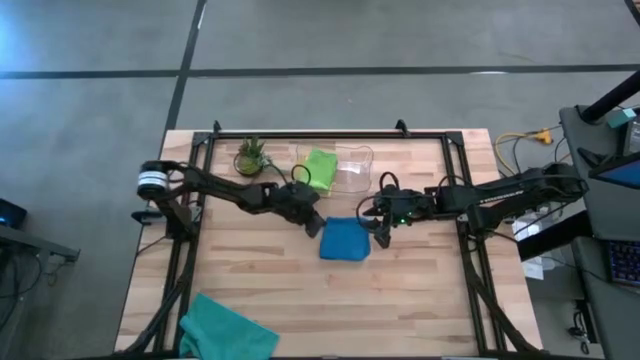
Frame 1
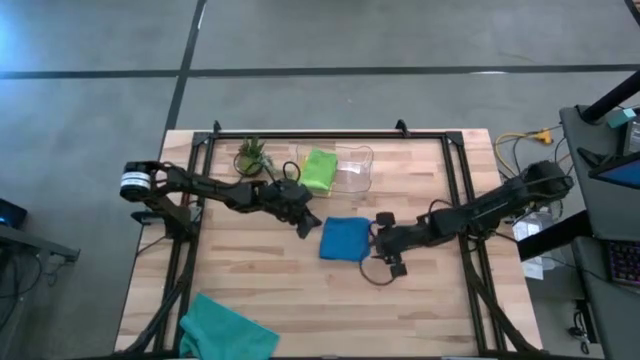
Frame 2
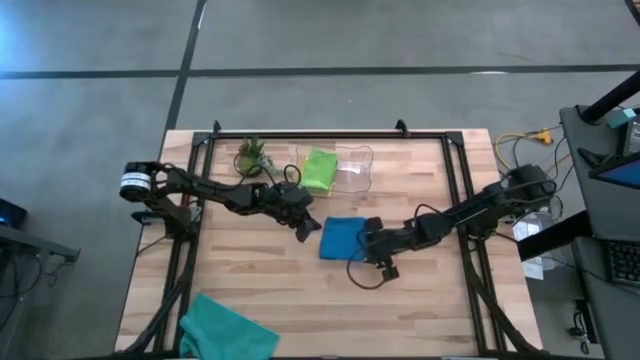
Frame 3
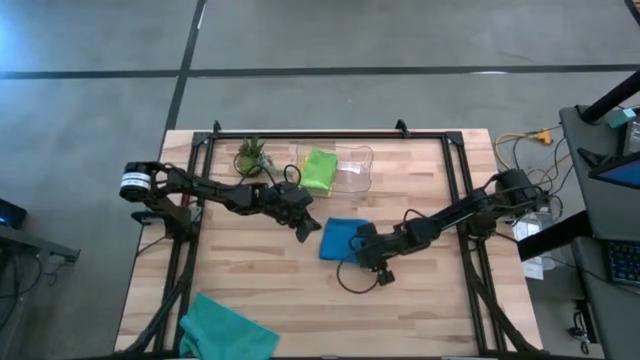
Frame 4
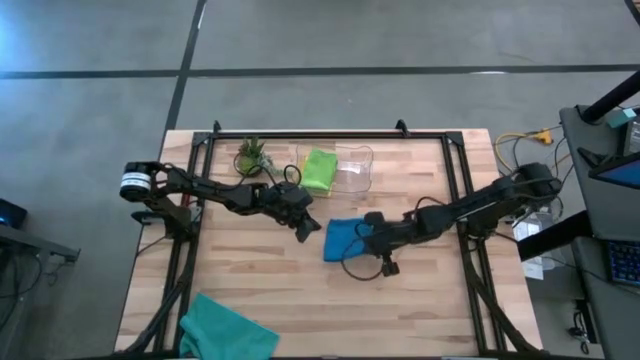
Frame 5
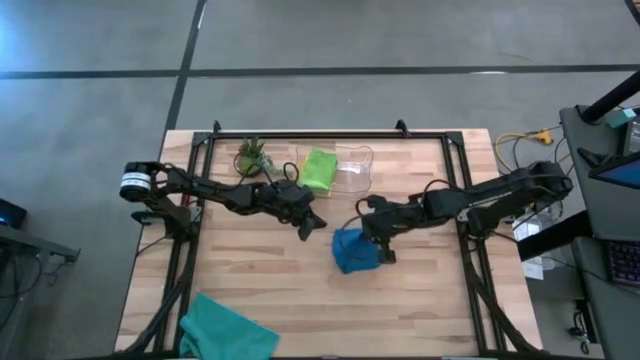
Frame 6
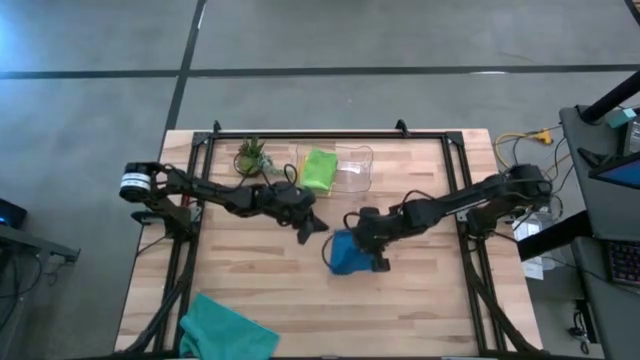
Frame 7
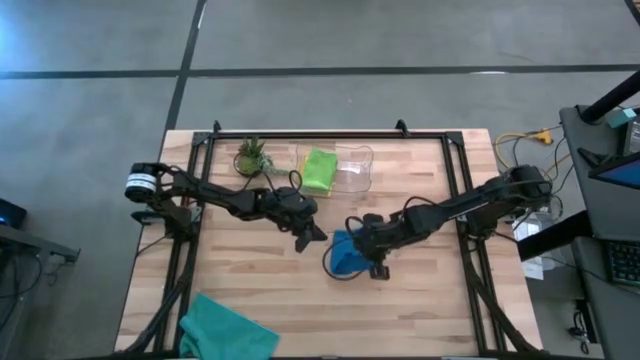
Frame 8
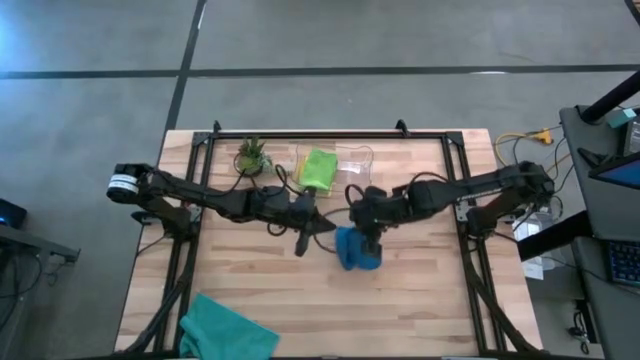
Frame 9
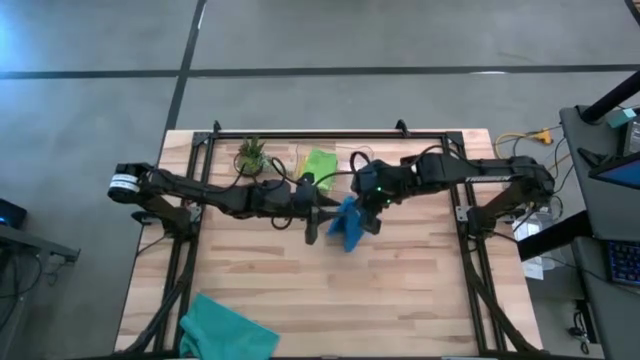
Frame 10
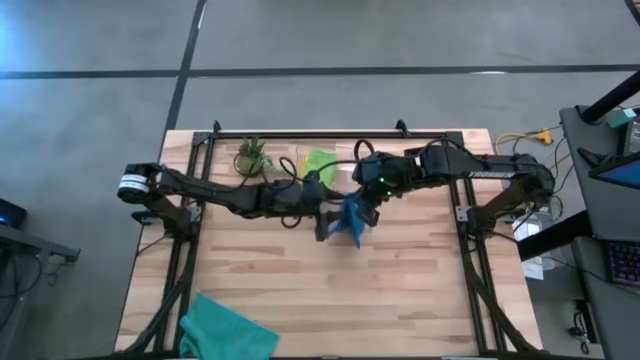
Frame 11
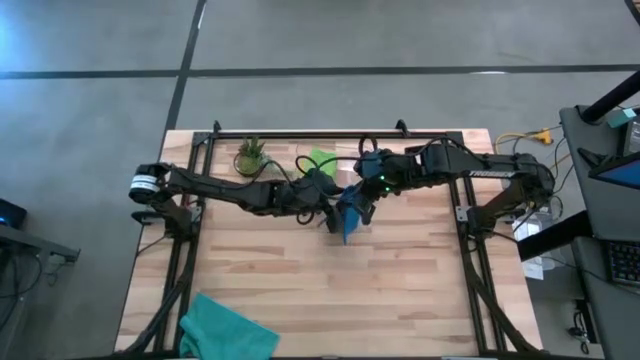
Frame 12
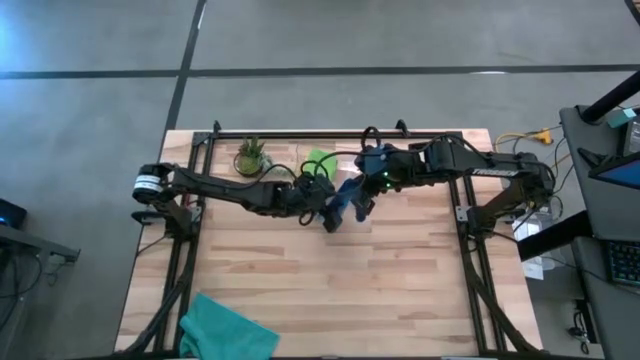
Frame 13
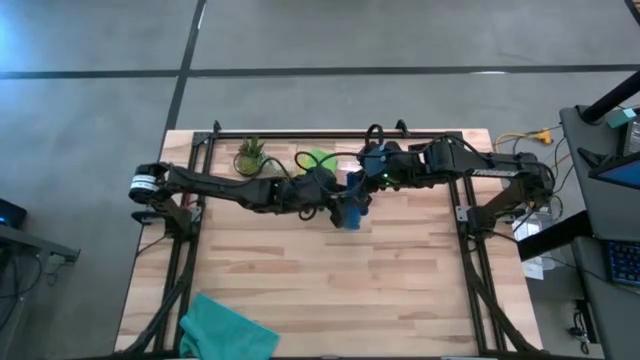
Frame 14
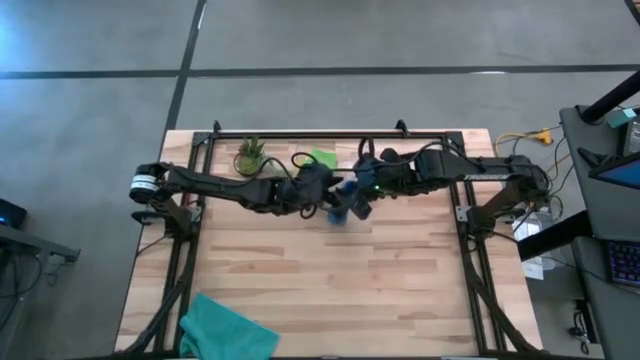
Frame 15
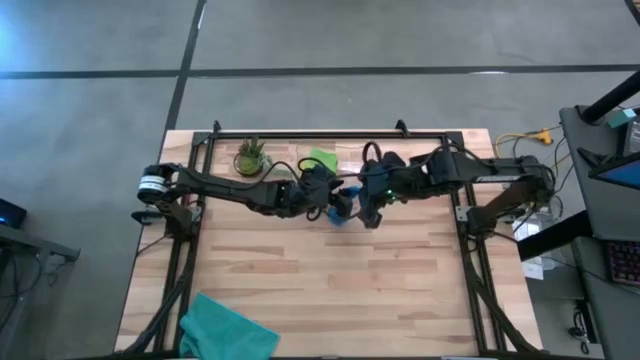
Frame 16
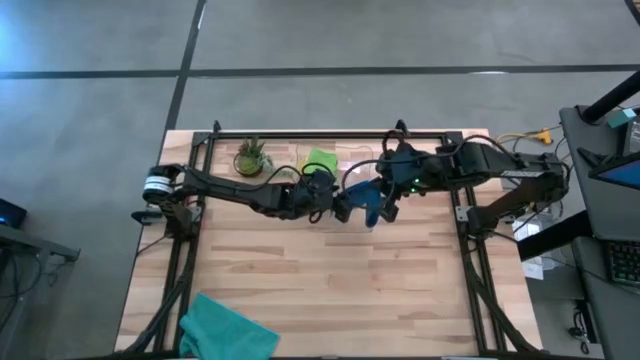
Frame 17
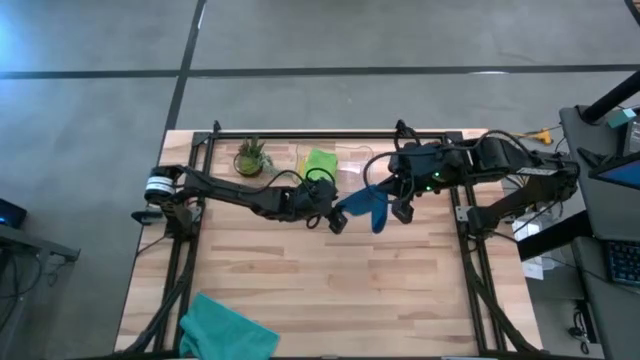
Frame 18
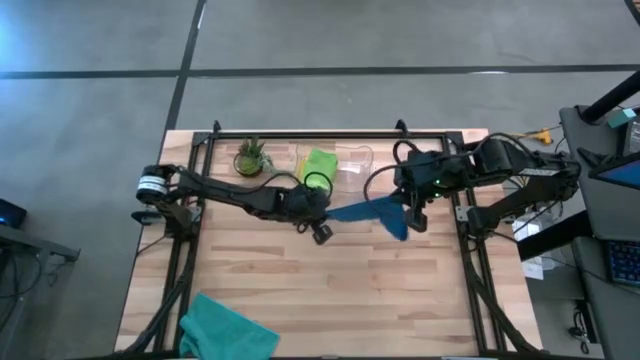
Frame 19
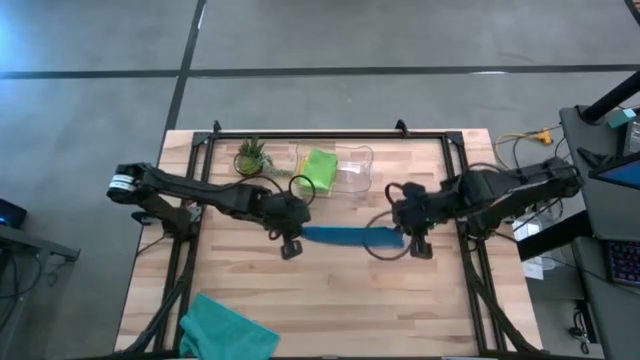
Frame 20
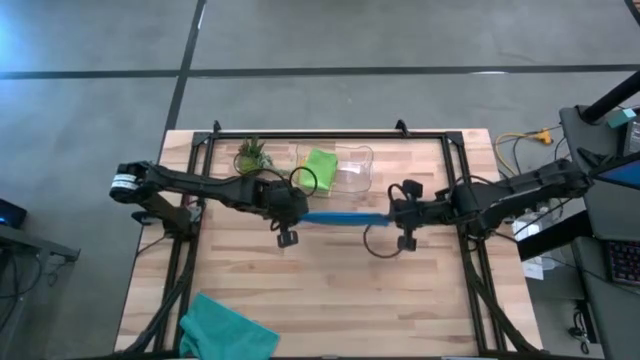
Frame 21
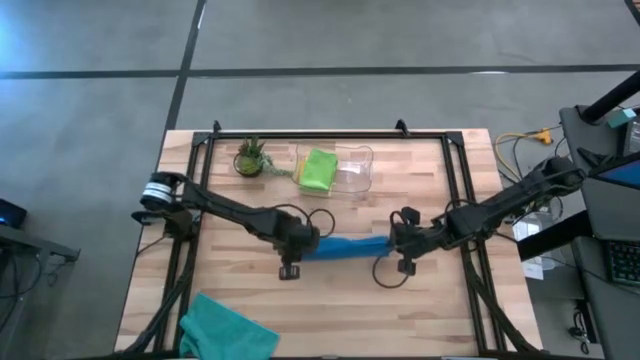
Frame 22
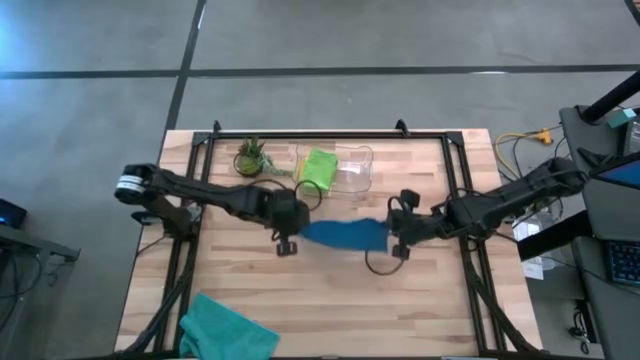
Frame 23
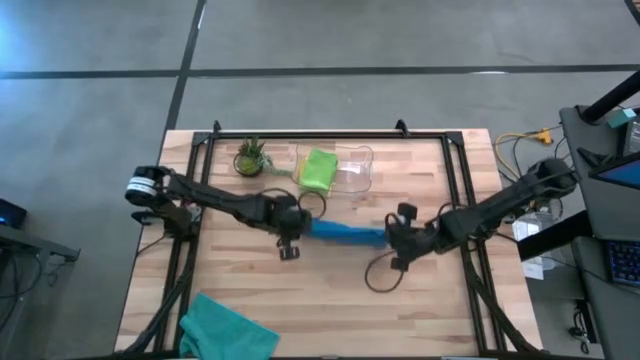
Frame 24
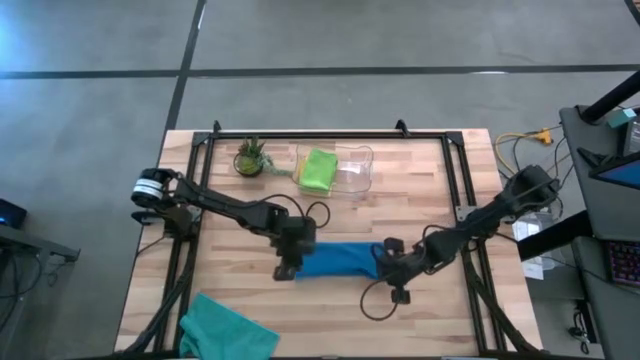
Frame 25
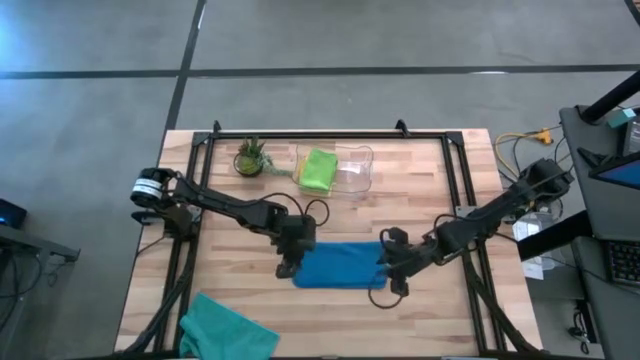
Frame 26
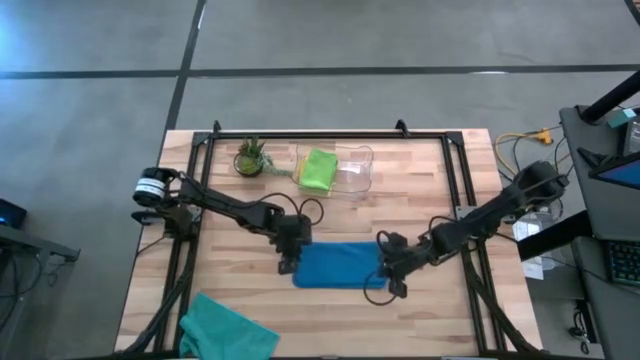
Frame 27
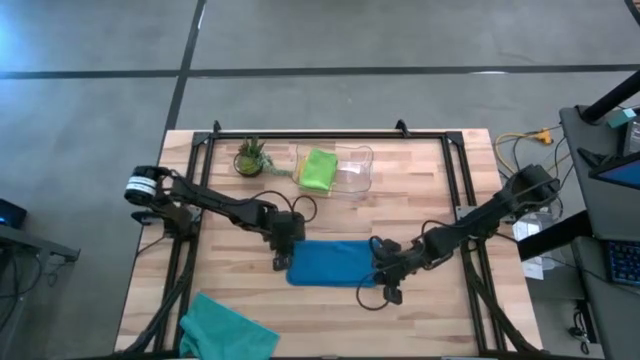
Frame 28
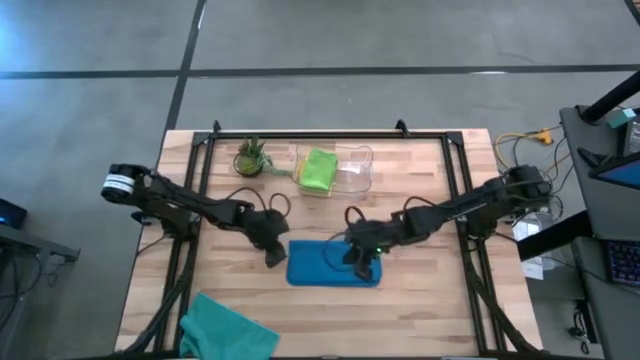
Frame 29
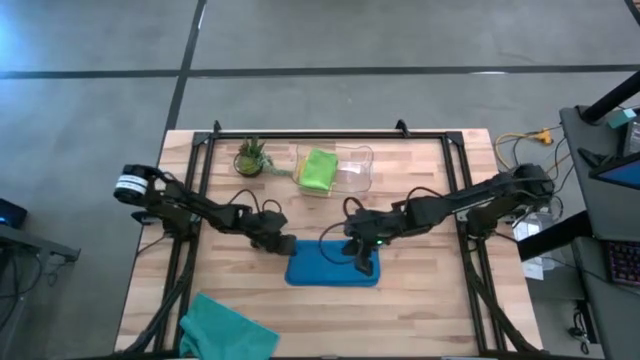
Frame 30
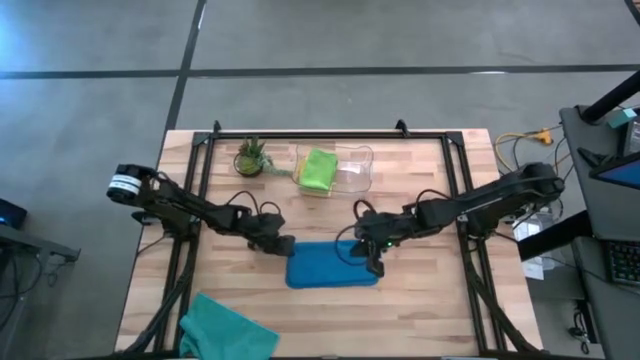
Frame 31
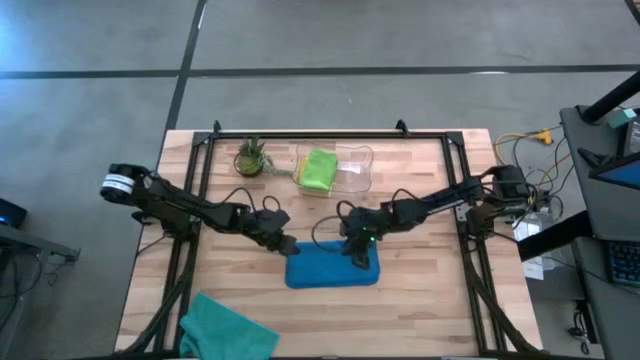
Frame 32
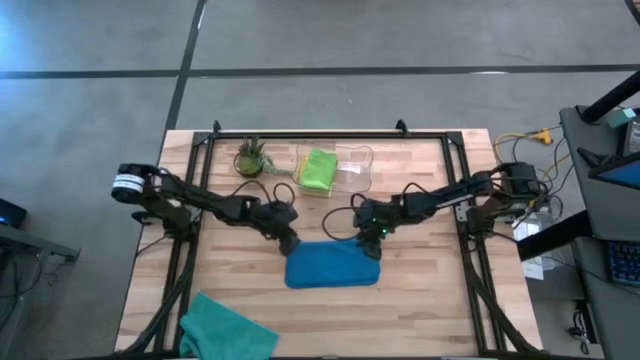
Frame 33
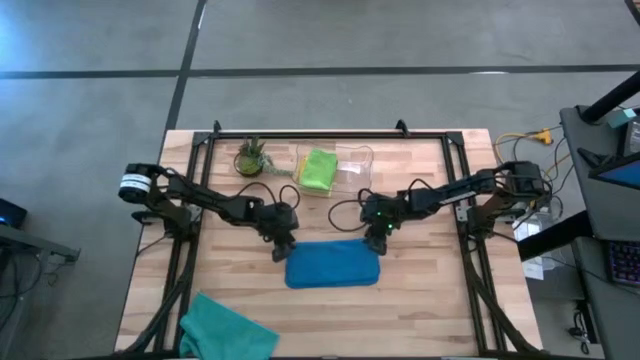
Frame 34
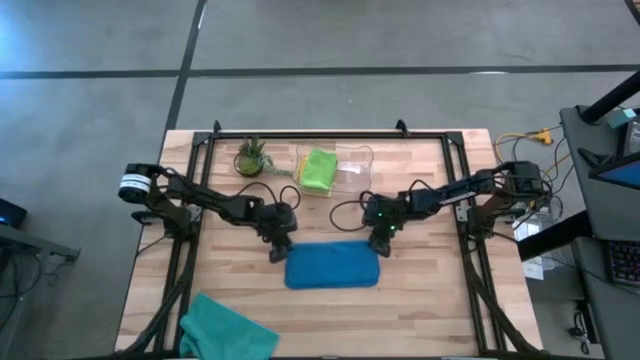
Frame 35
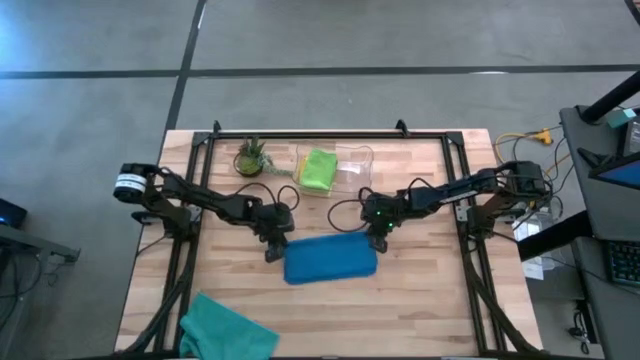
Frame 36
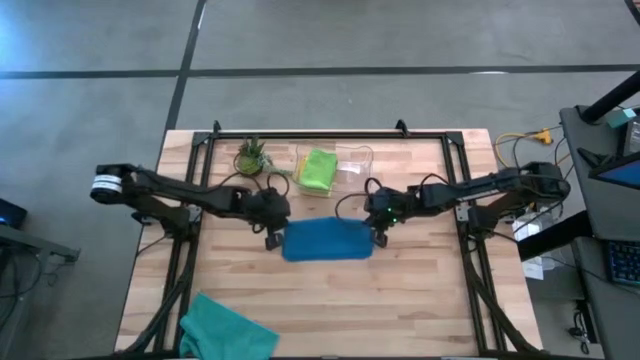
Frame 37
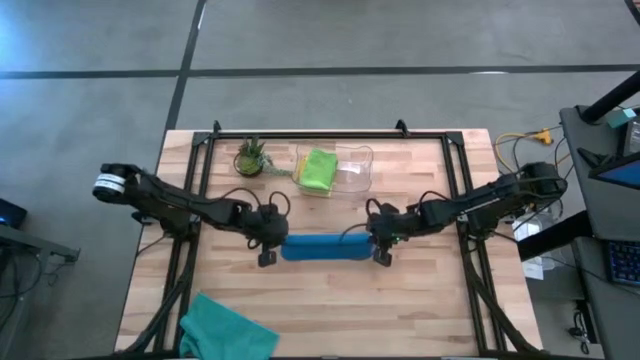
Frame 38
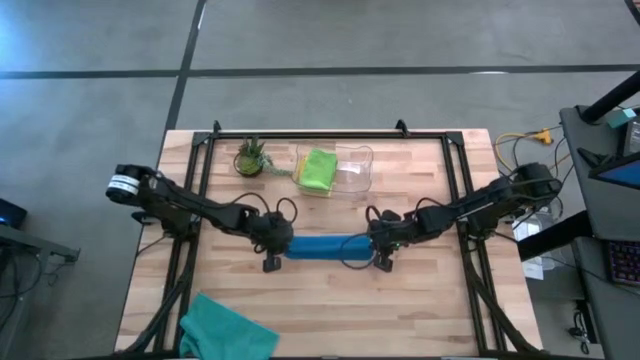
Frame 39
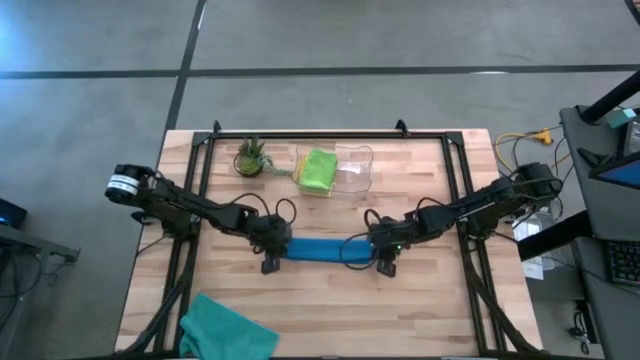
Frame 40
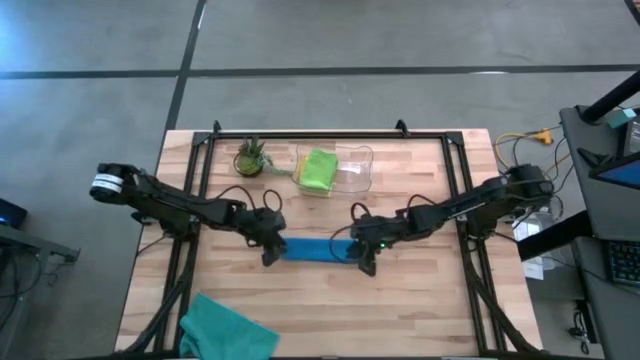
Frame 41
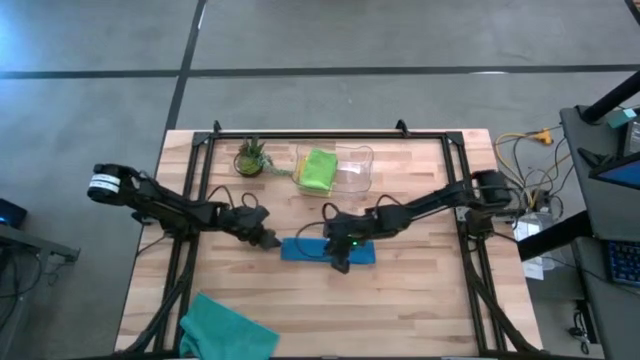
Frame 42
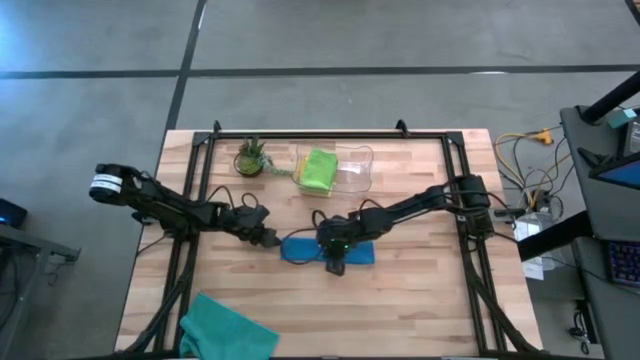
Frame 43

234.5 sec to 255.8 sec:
Task: Fold microfiber towels
Fold the blue microfiber towel
